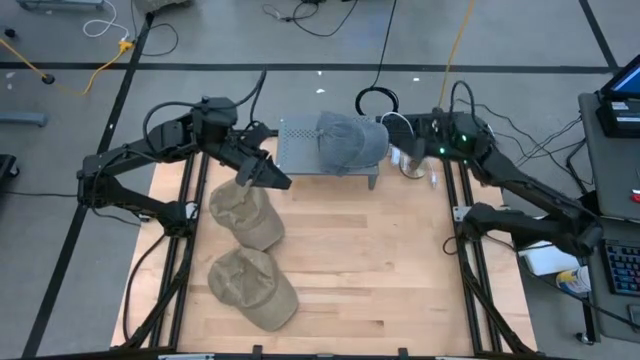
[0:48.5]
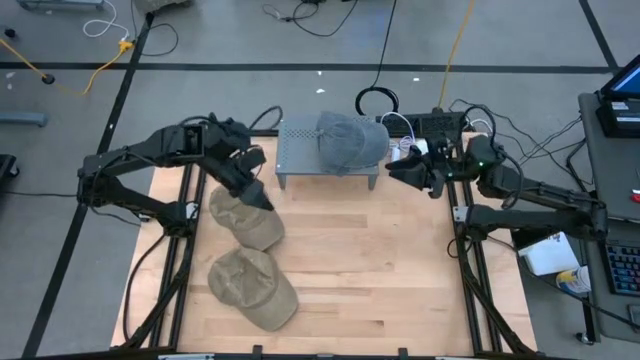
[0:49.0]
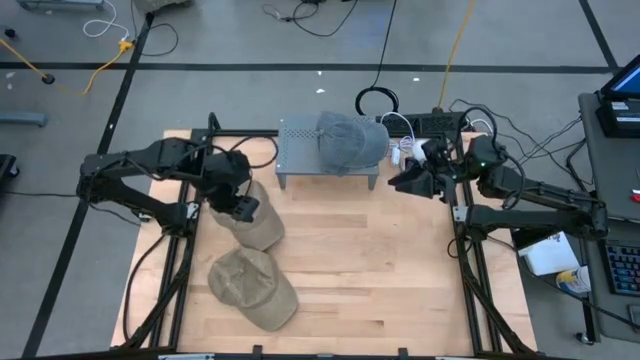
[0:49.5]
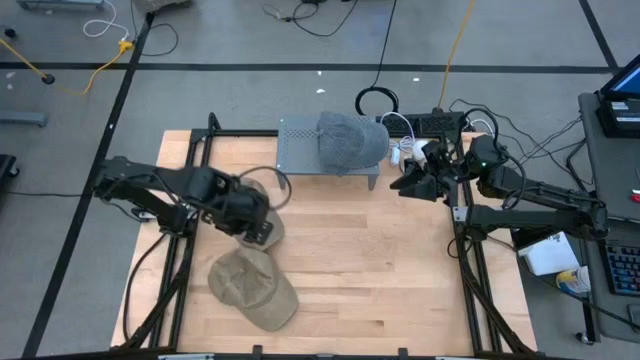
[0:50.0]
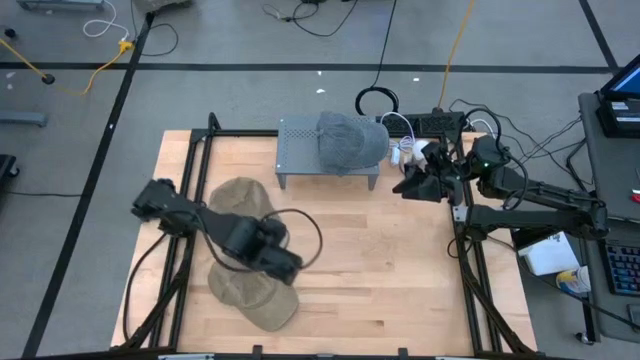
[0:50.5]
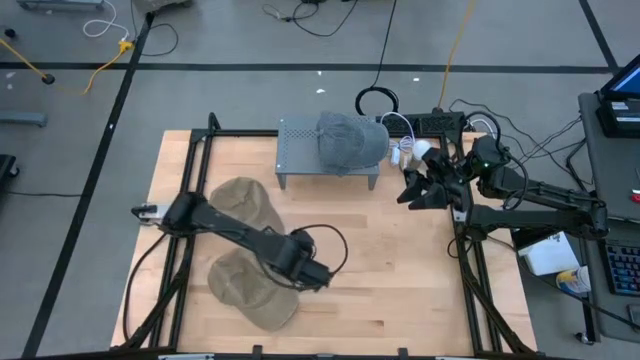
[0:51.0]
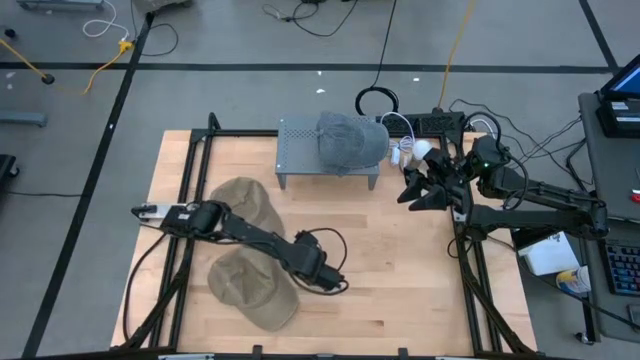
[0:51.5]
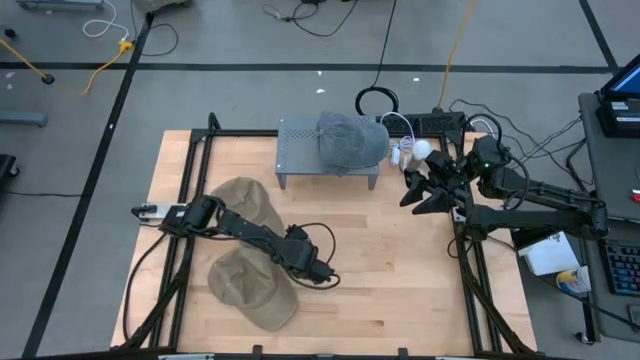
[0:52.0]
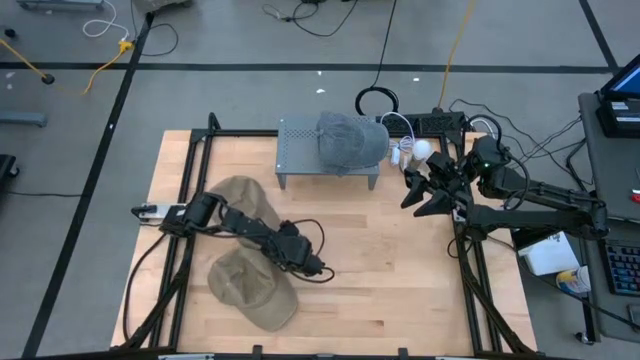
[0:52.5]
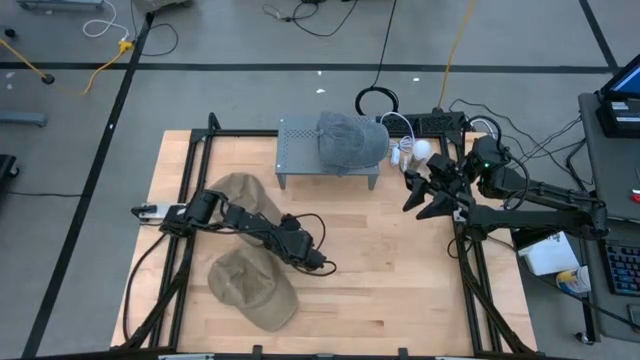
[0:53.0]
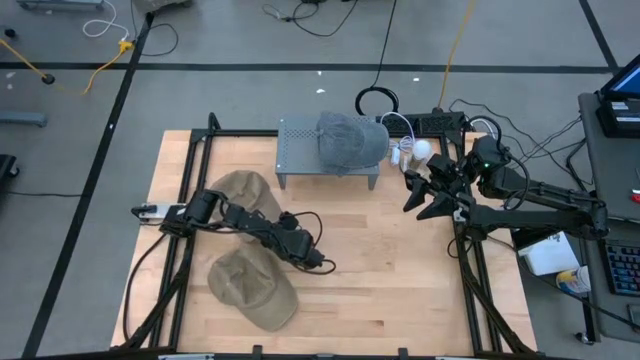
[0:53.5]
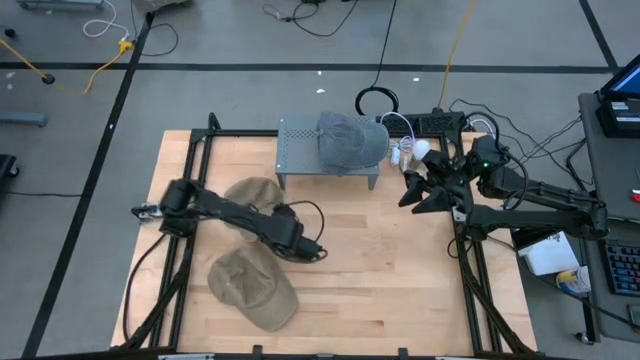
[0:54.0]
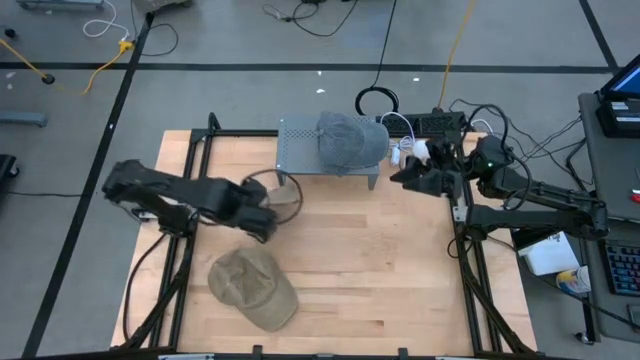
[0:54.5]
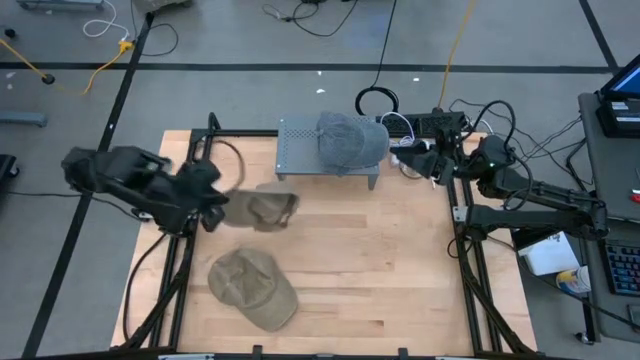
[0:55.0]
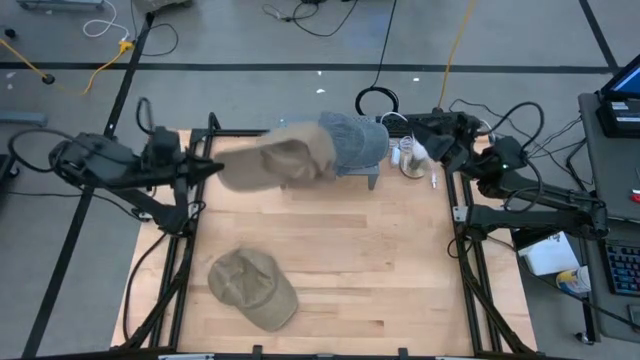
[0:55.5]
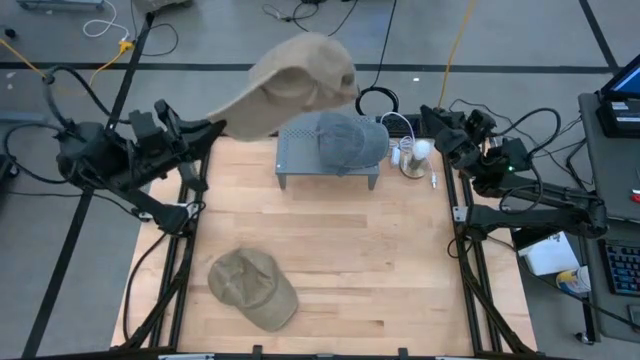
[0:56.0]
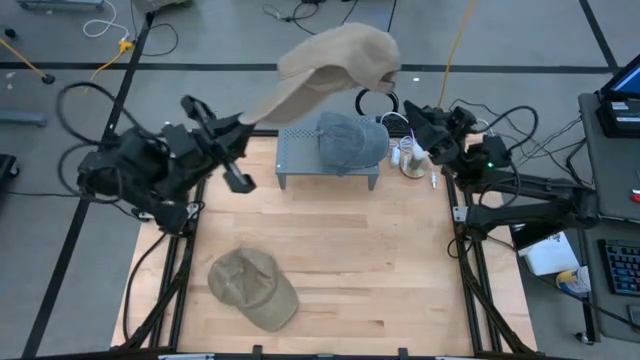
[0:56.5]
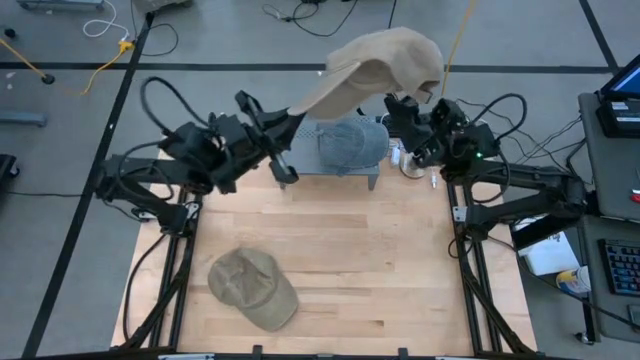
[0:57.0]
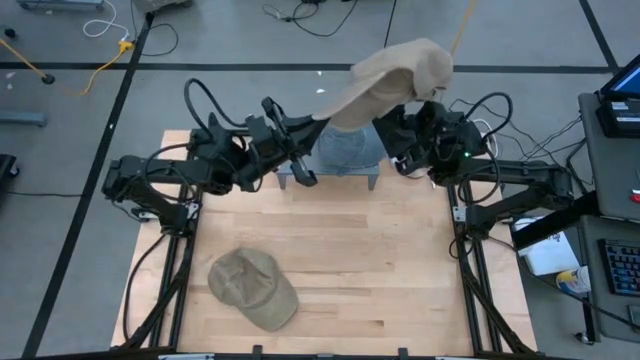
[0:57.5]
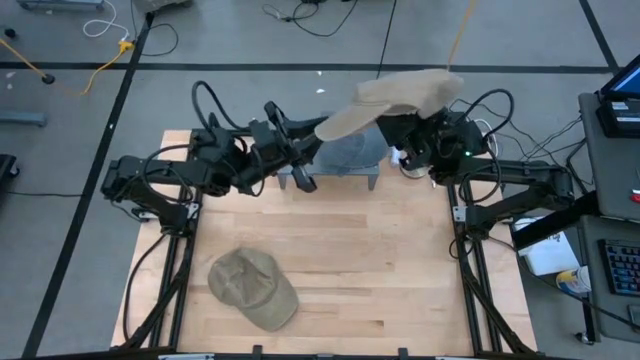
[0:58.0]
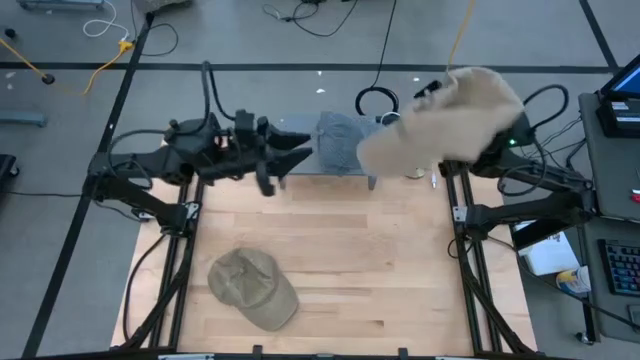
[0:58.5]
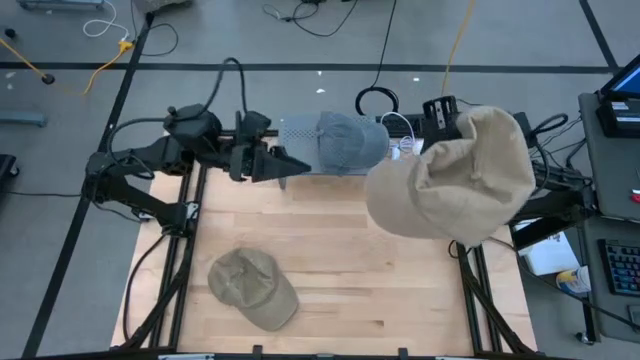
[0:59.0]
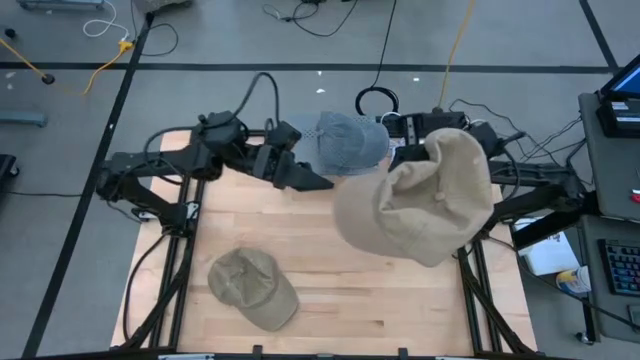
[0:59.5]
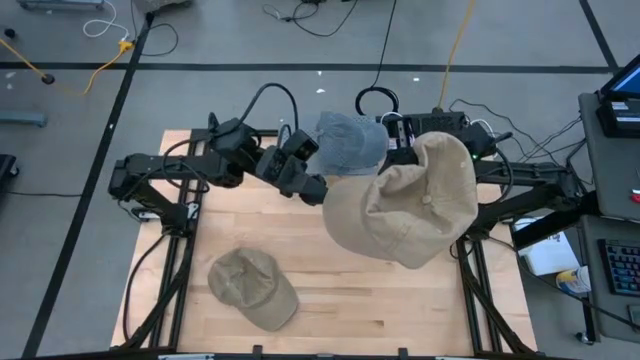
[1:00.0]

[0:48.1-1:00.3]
Task: Pick & Place hat
Put the top brown cap on the shelf

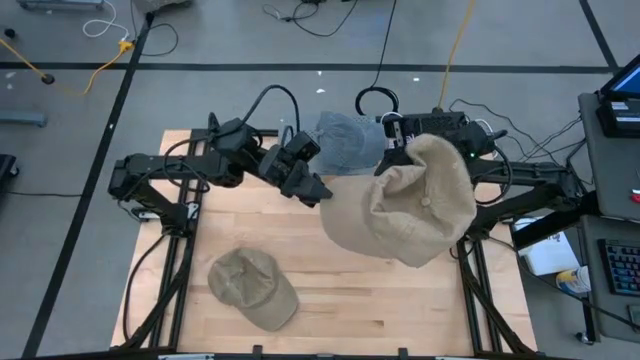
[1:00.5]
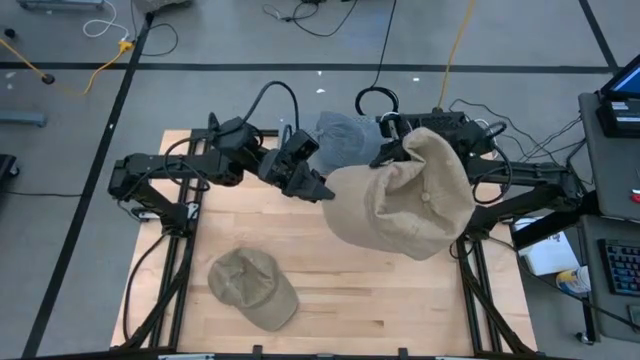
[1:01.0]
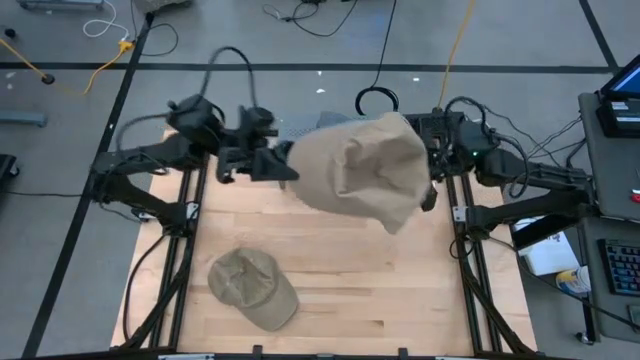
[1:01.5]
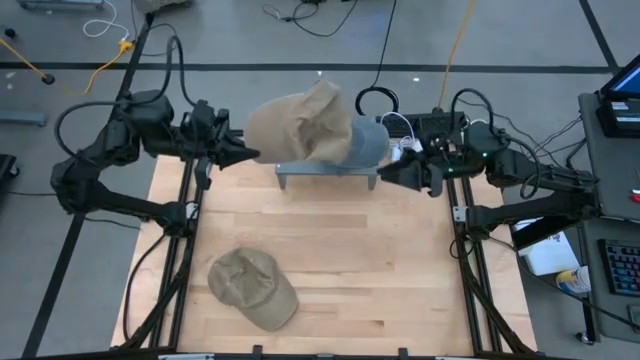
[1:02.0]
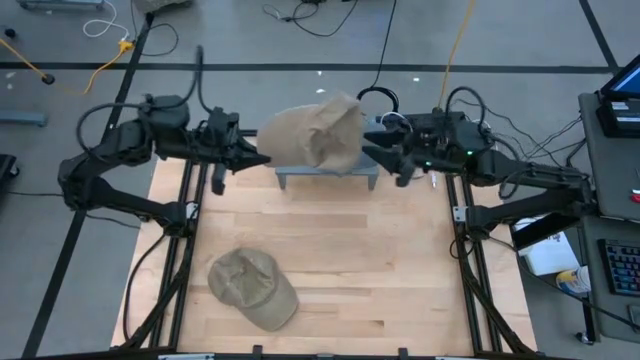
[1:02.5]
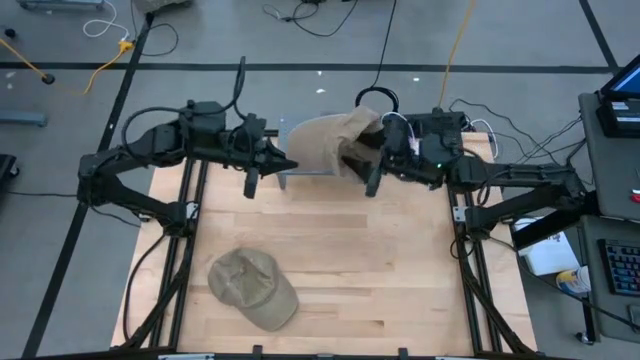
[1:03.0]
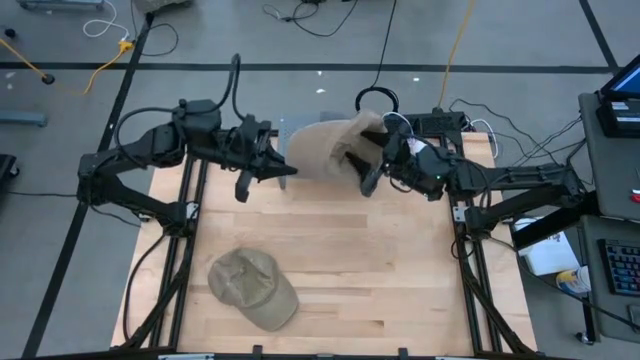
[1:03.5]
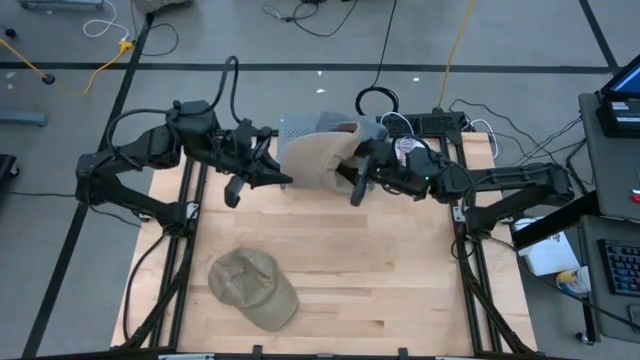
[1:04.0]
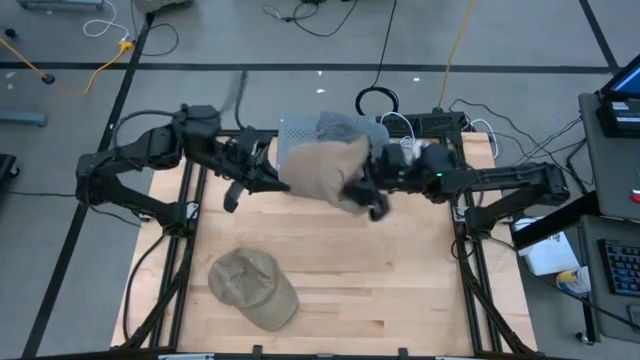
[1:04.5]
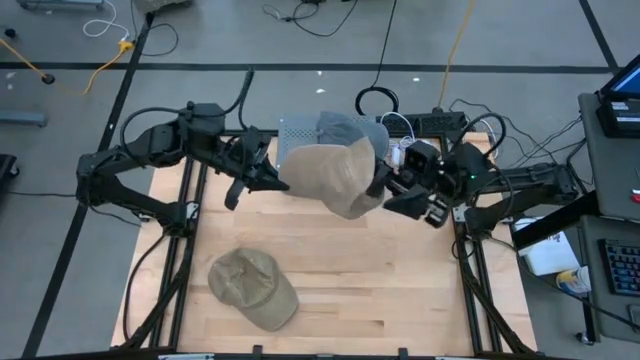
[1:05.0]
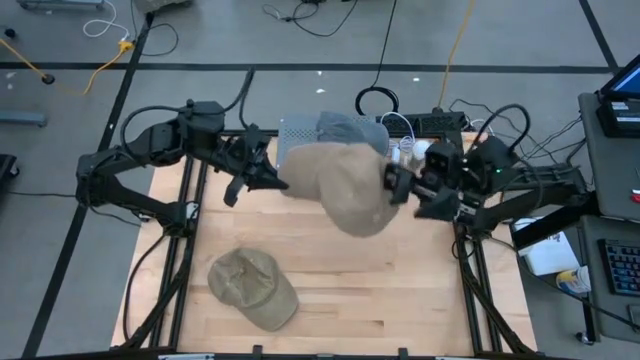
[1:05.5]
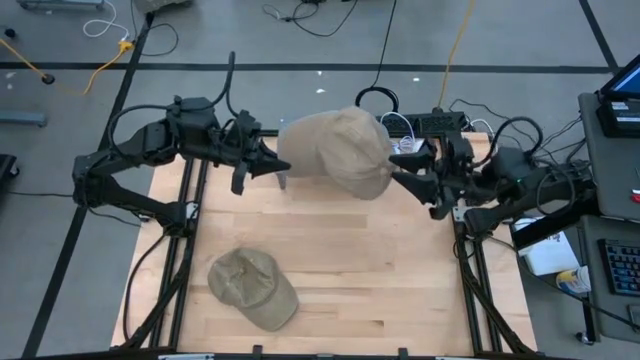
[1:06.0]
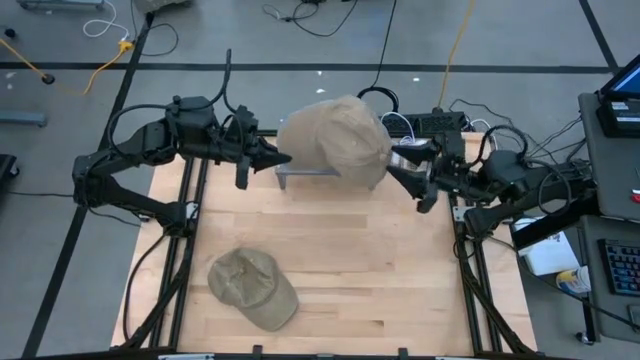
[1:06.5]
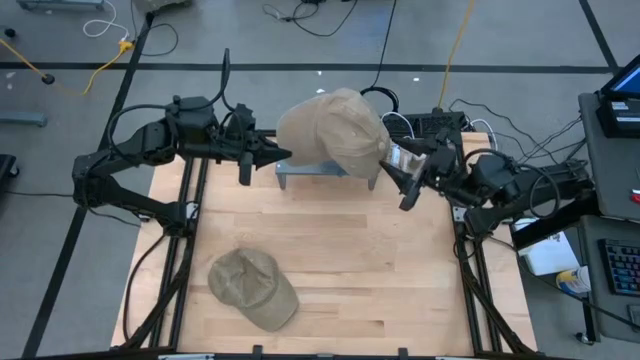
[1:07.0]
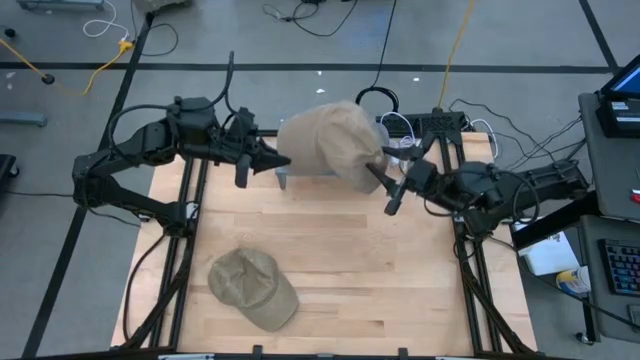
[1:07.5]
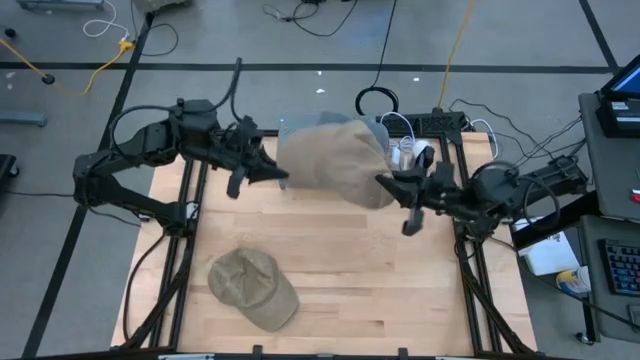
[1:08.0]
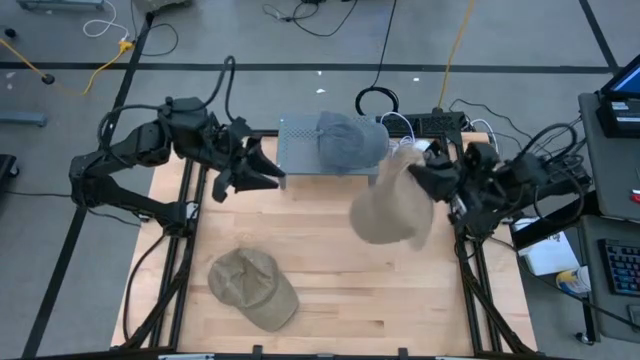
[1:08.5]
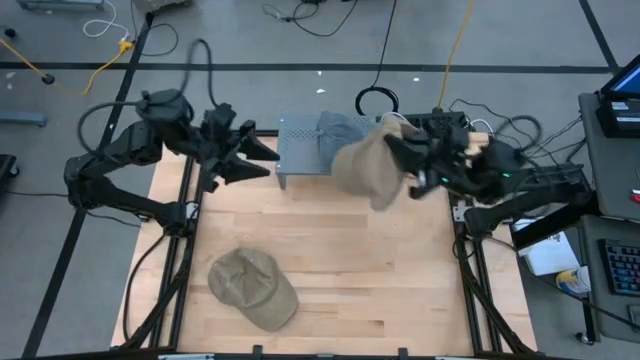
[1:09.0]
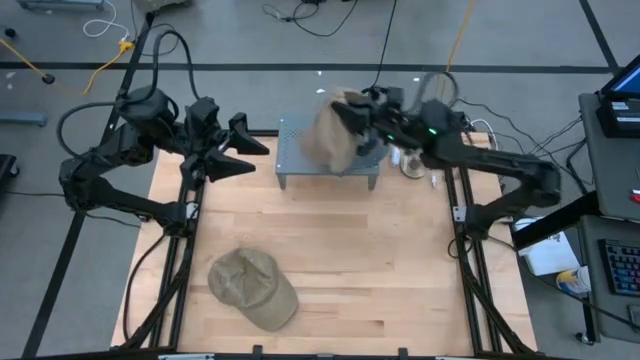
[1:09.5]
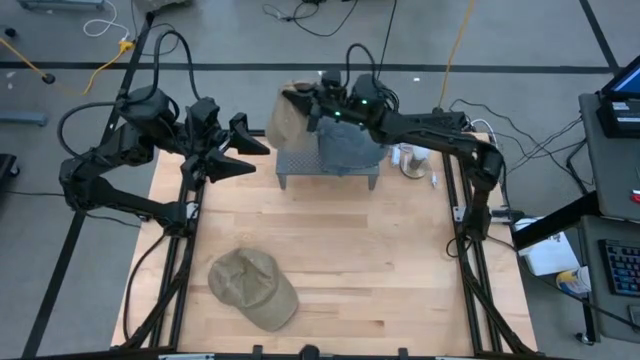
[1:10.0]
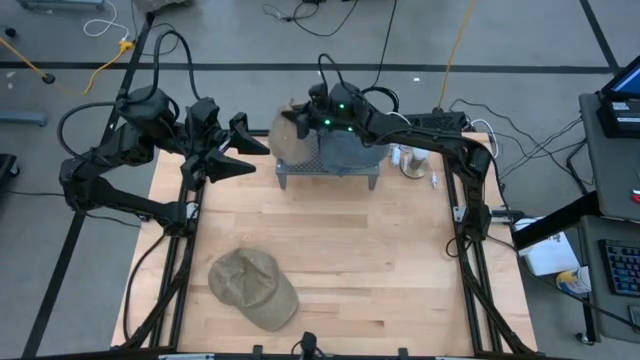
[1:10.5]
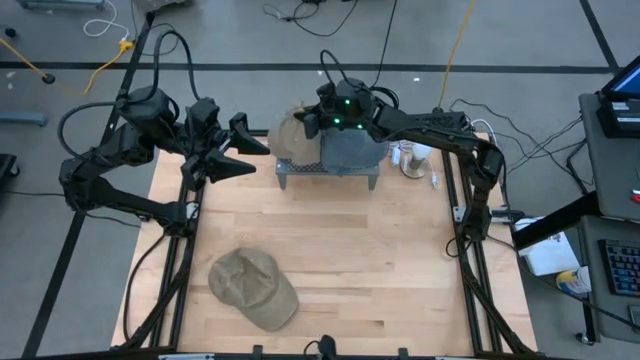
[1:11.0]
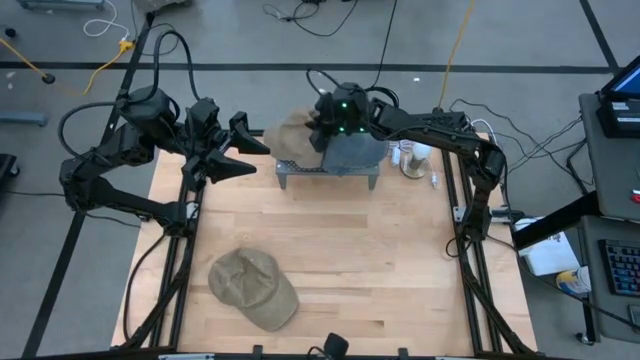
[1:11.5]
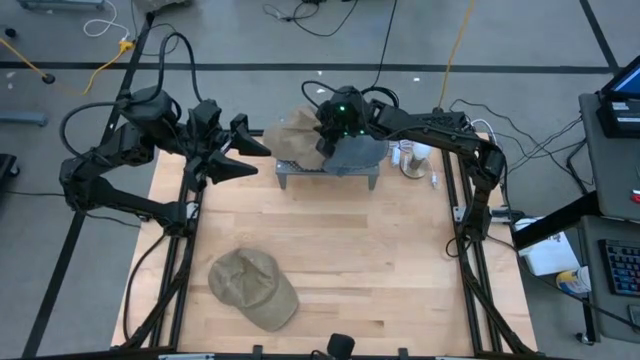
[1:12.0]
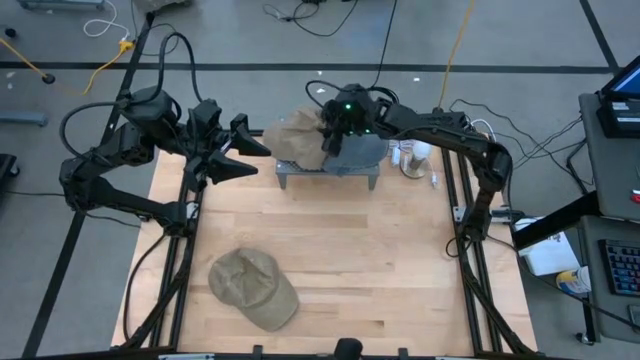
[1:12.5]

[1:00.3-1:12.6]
Put the top brown cap on the shelf
